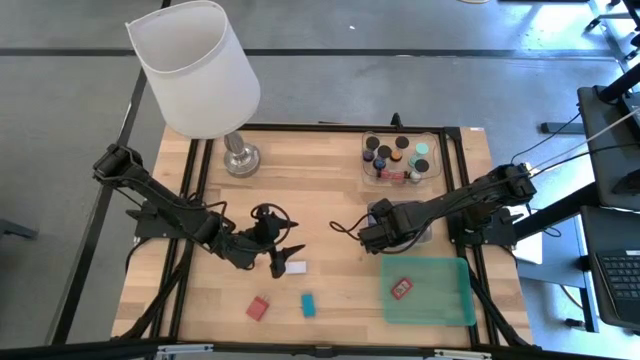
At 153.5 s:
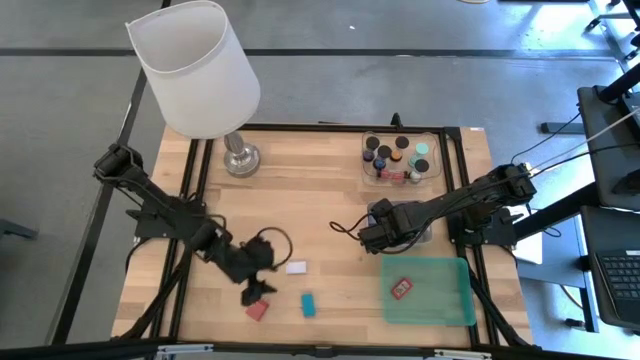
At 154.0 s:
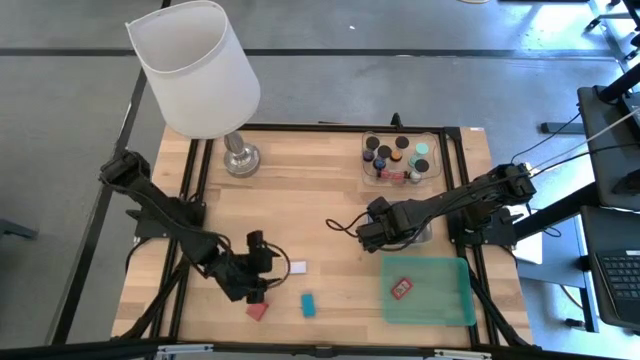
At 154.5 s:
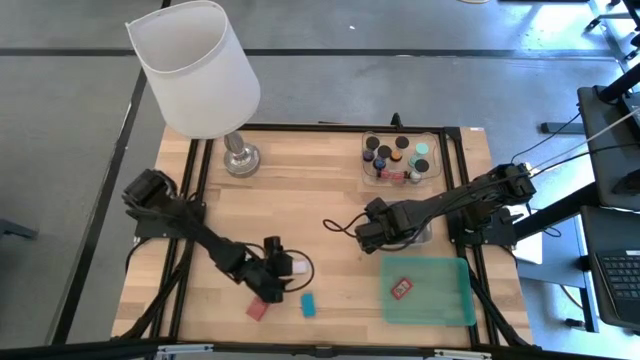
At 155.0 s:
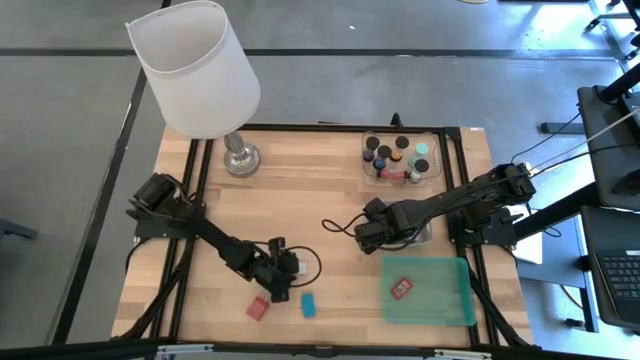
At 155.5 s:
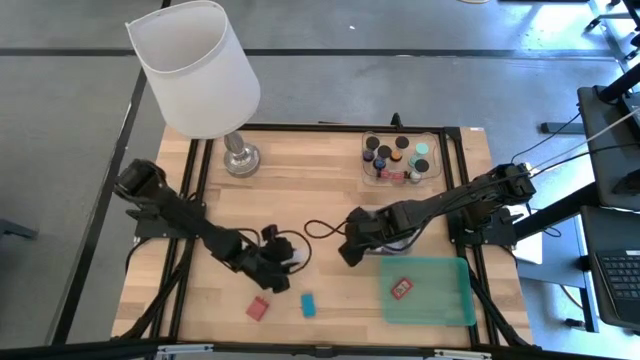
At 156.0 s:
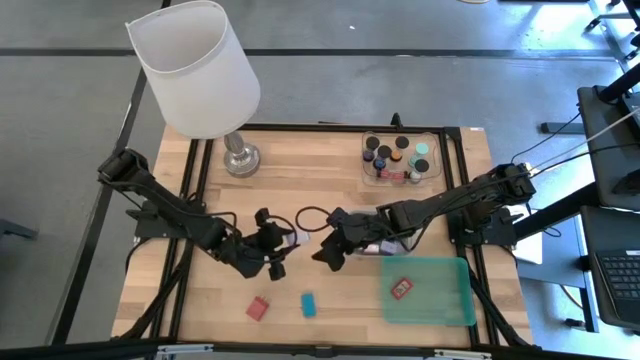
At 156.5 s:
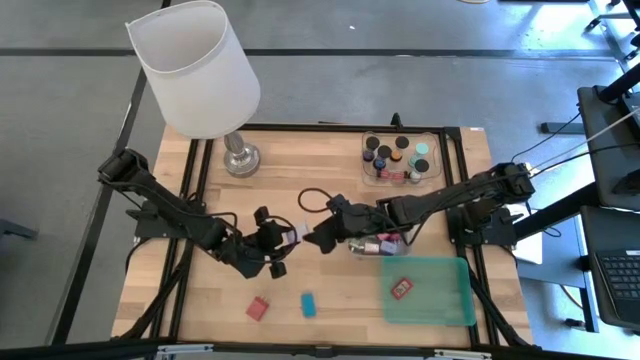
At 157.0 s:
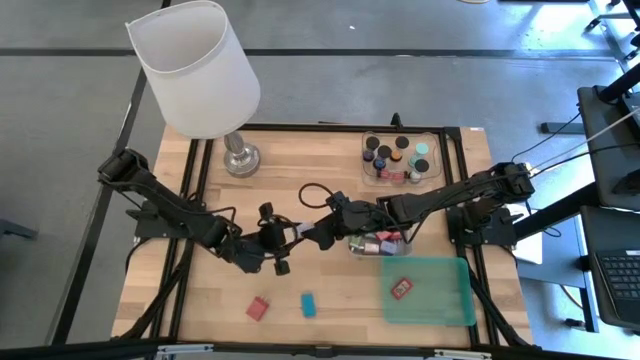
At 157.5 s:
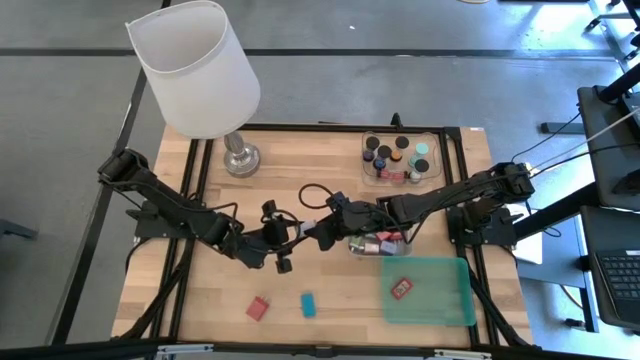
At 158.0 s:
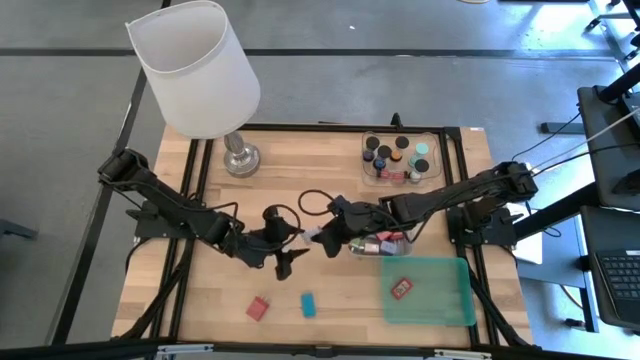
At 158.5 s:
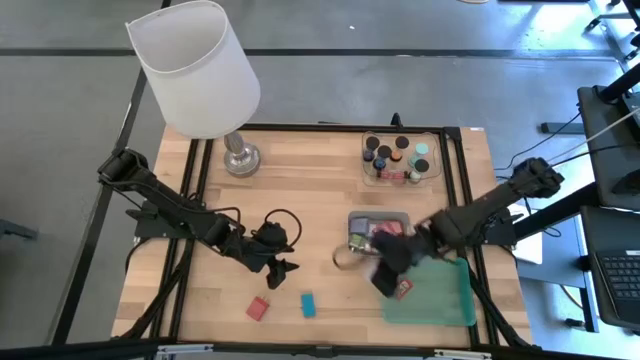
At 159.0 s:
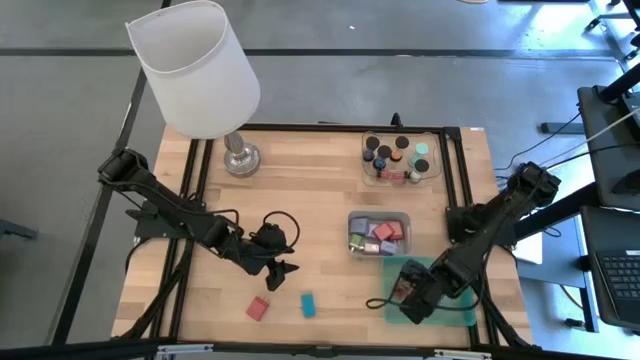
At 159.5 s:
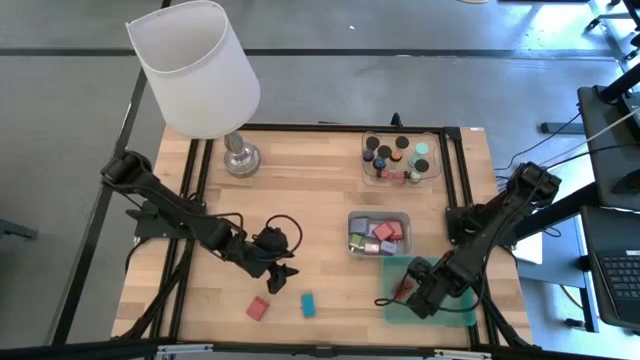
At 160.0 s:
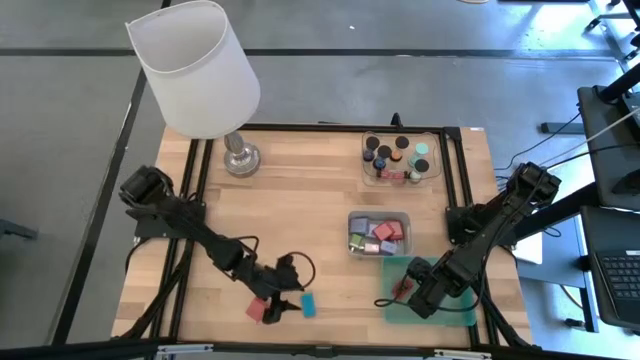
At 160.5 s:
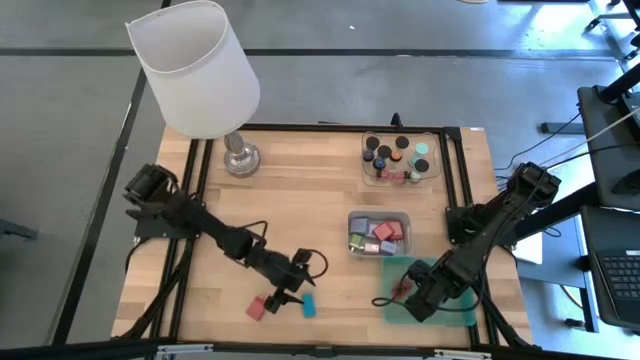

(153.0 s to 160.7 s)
Task: Pick & Place Office items
Put the white timer into the green bin

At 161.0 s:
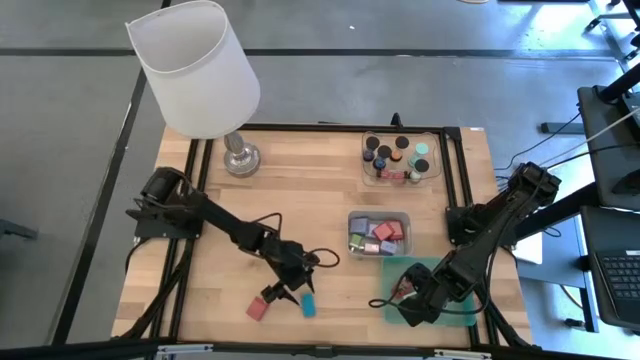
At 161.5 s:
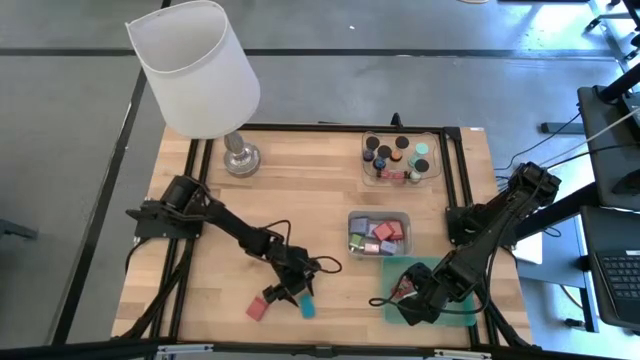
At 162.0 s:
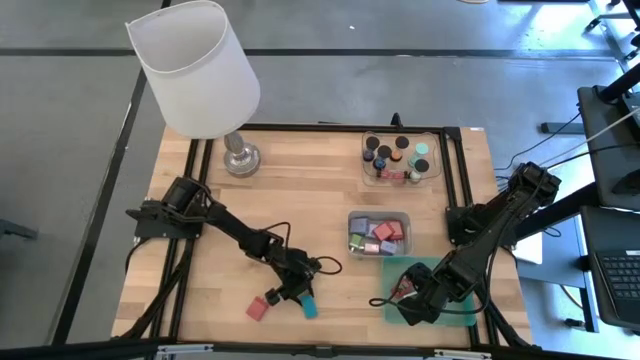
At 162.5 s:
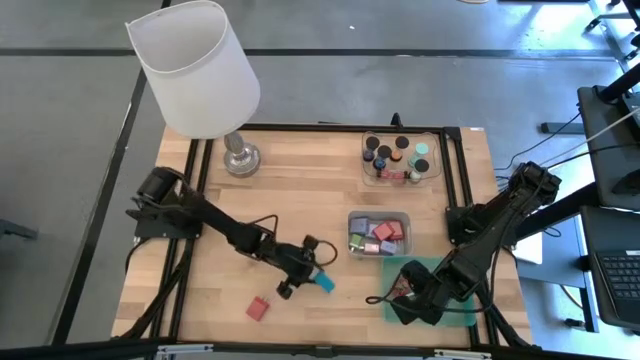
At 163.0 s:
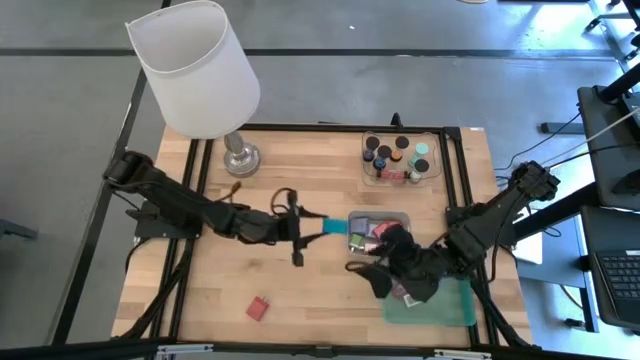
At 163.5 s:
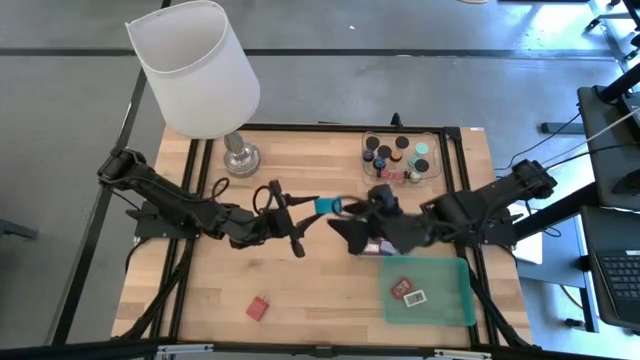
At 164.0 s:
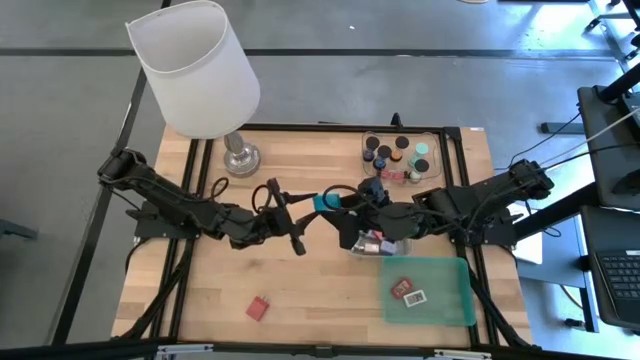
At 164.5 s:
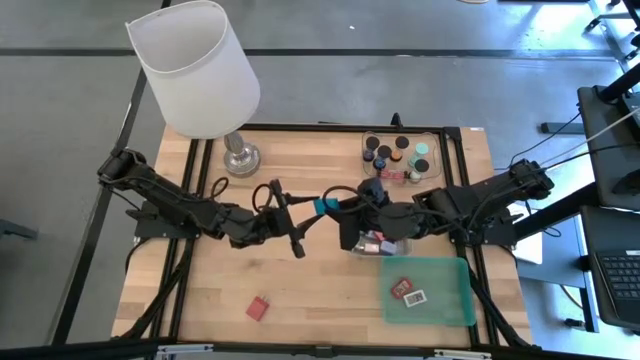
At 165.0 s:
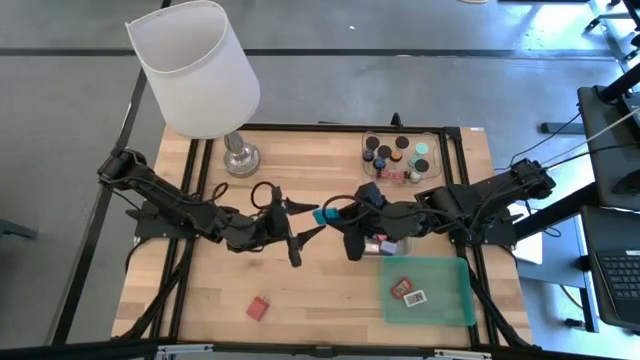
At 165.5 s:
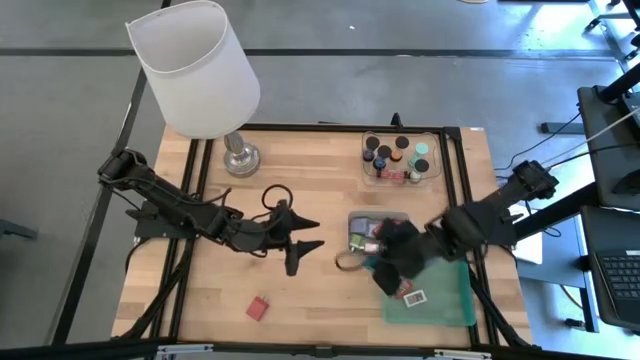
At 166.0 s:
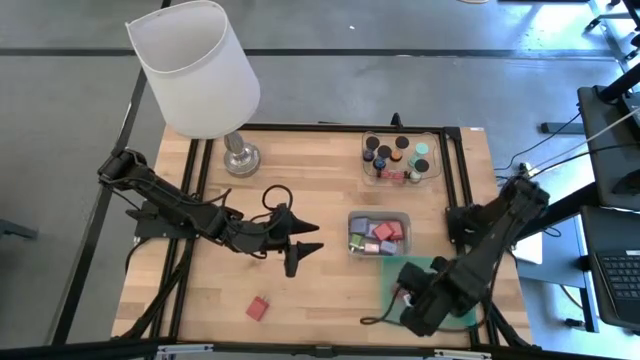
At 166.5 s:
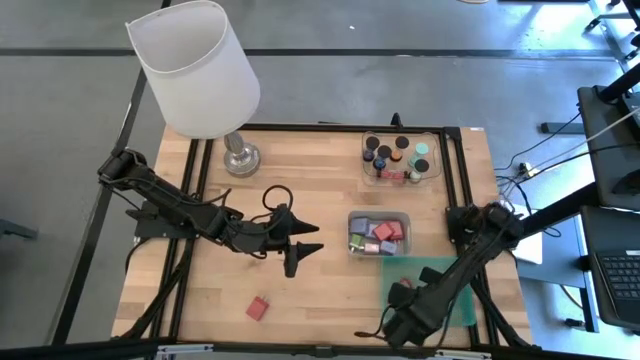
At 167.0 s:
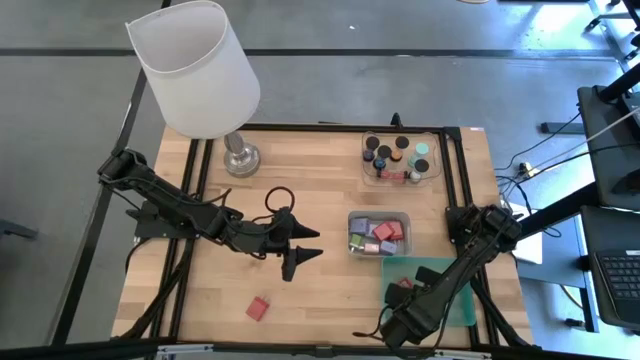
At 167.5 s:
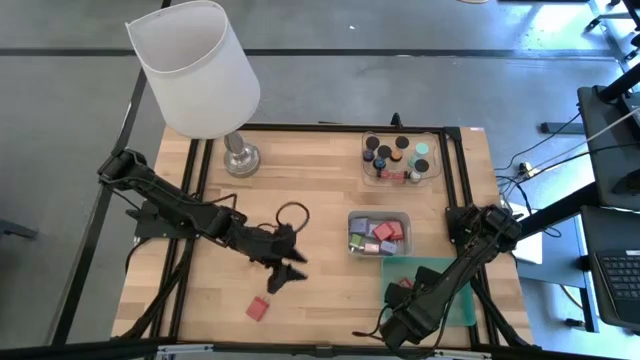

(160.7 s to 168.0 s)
Put the blue timer into the green bin

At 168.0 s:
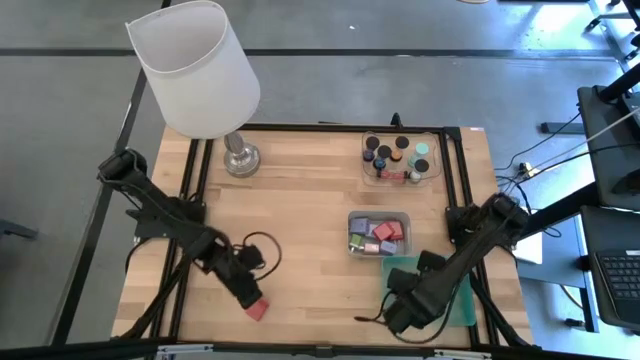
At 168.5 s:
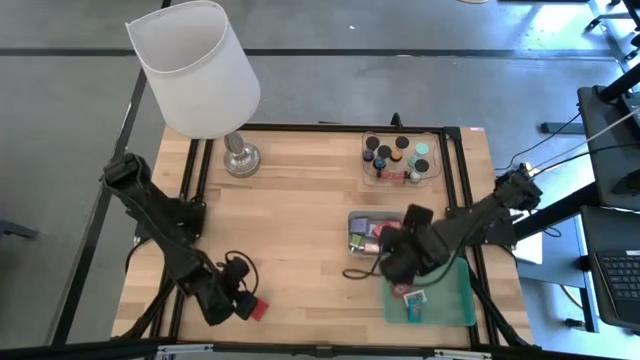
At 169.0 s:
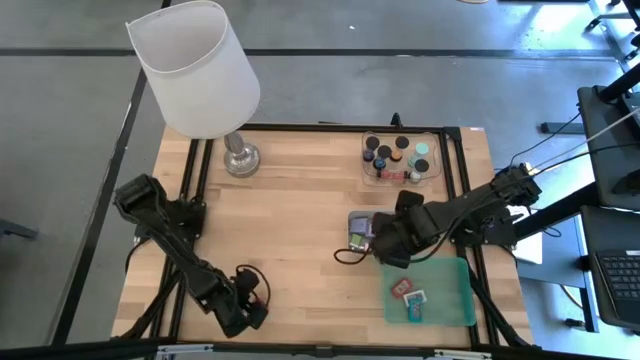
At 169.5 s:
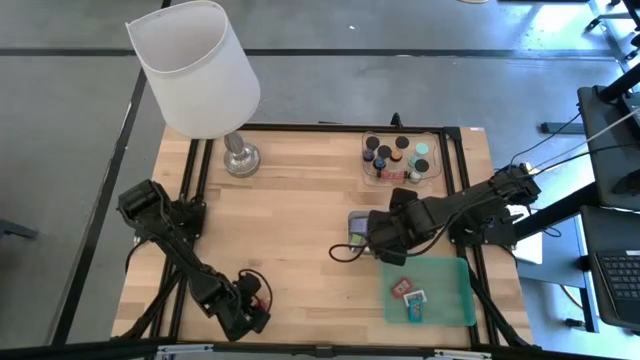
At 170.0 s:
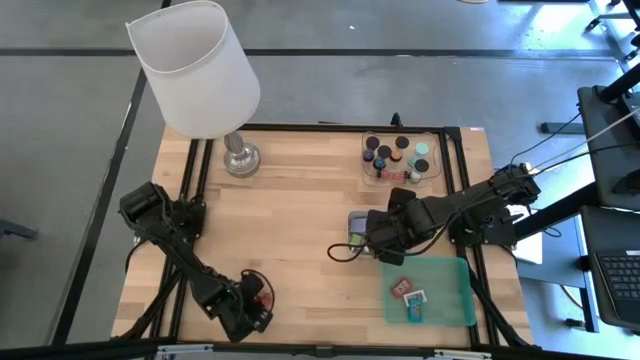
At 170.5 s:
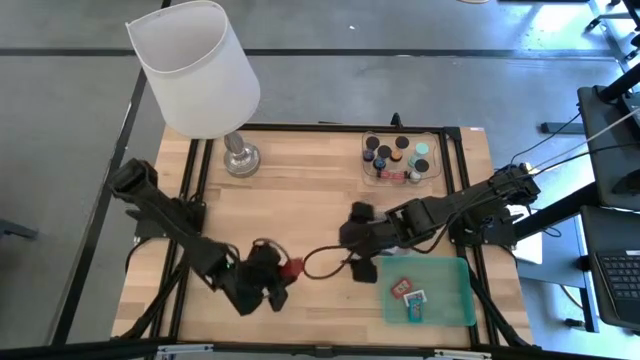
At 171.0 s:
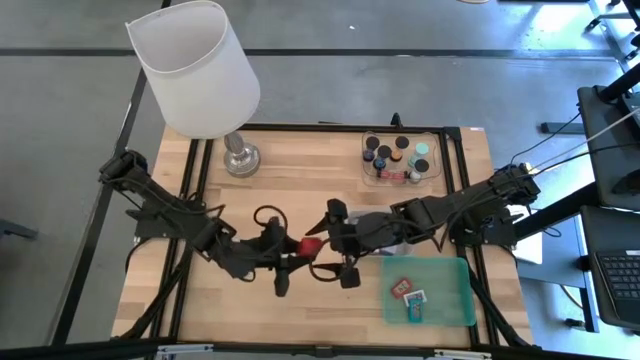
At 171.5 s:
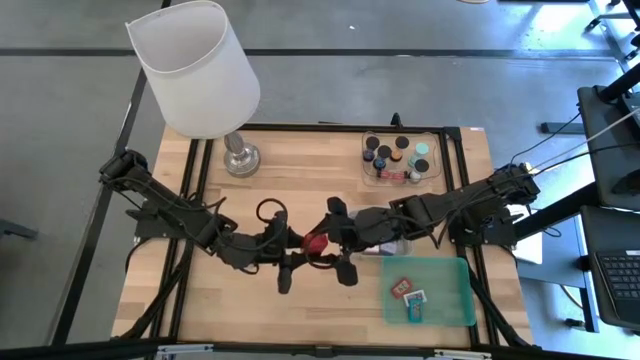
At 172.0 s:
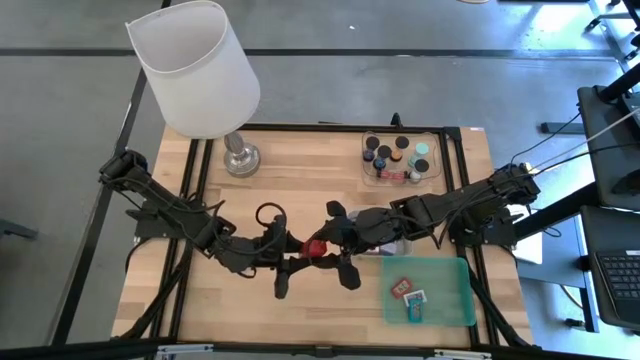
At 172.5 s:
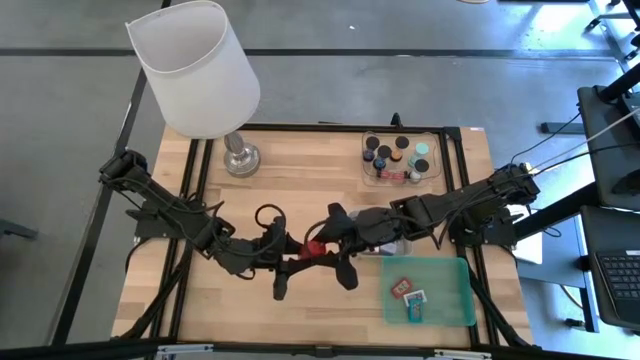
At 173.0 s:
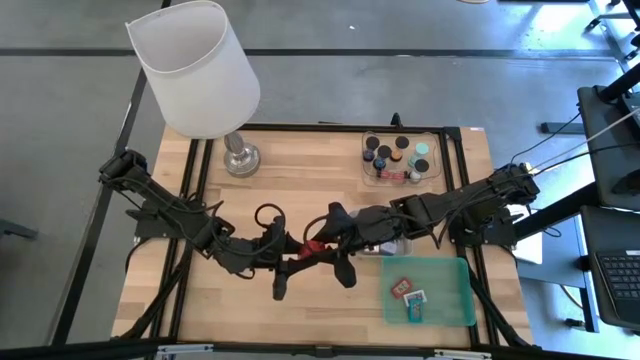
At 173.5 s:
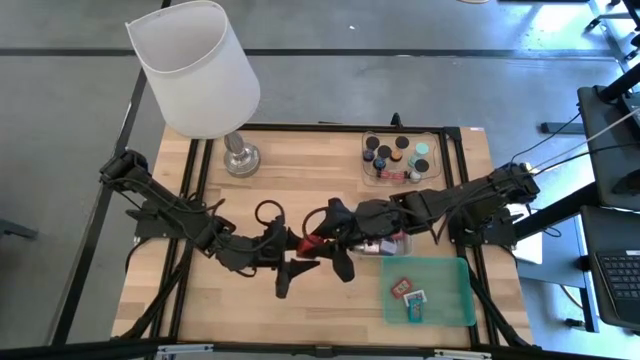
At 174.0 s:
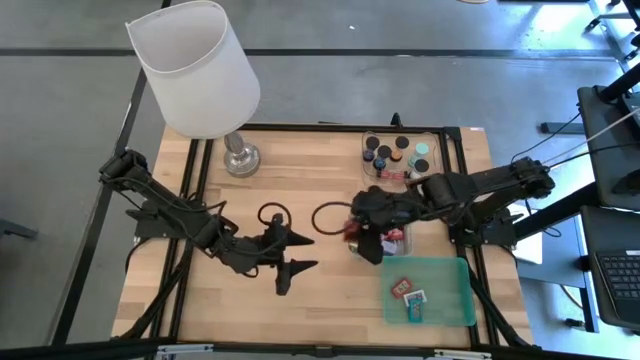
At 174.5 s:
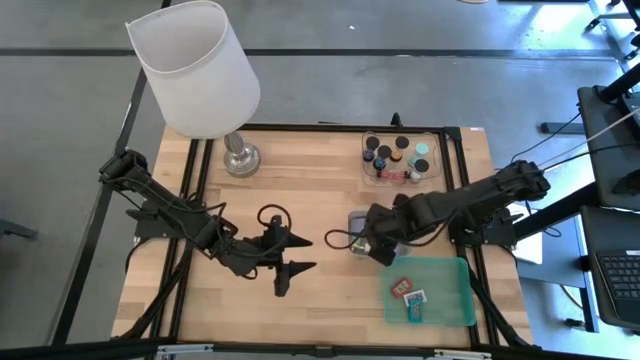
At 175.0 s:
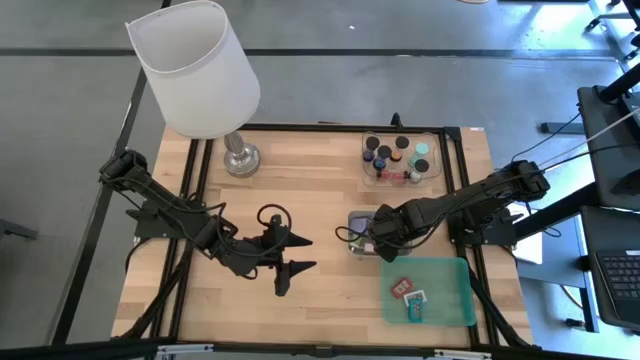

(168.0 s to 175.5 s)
Put the red charger adapter into the white bin
